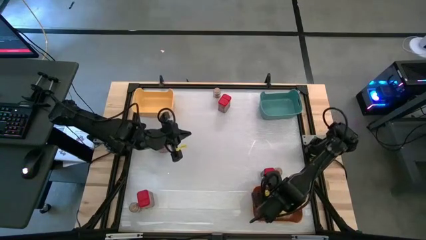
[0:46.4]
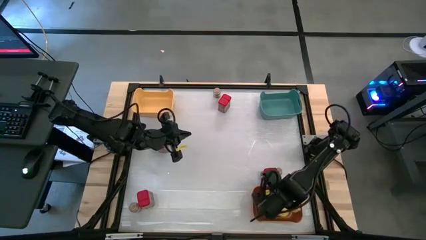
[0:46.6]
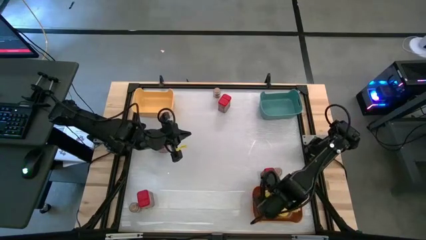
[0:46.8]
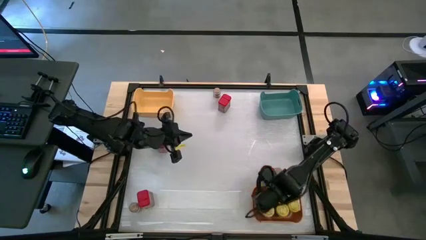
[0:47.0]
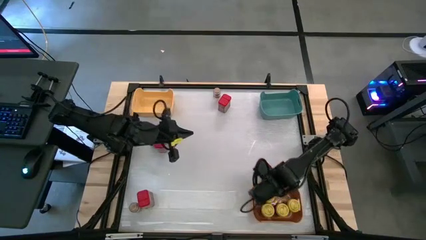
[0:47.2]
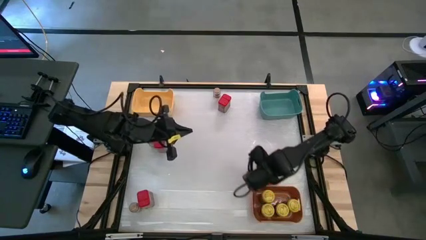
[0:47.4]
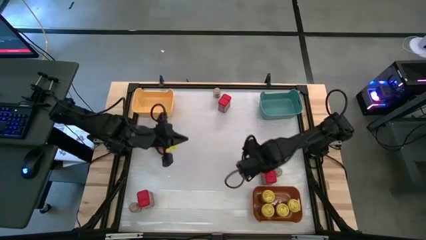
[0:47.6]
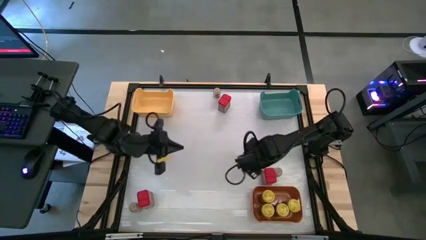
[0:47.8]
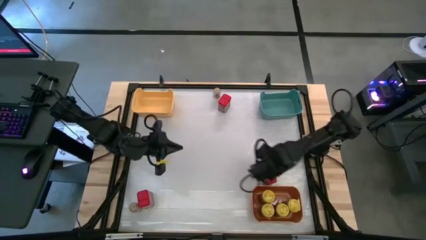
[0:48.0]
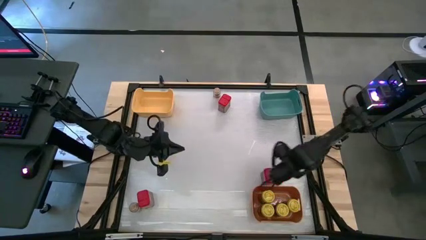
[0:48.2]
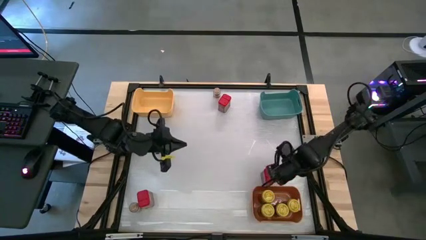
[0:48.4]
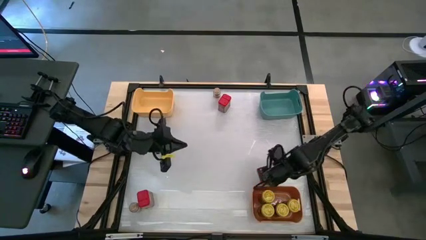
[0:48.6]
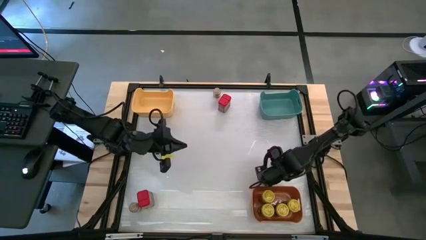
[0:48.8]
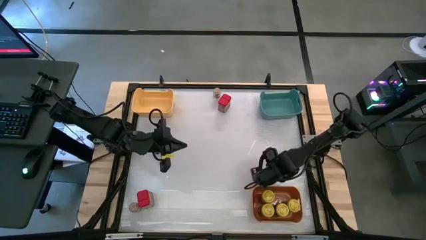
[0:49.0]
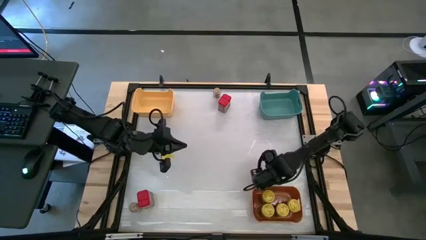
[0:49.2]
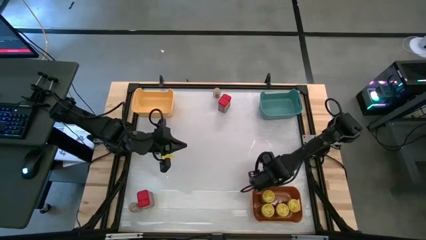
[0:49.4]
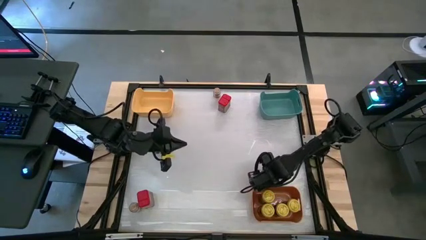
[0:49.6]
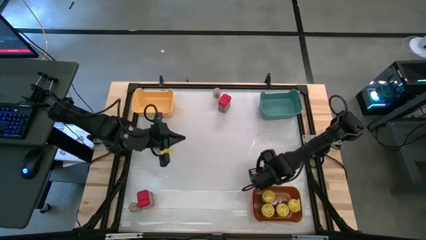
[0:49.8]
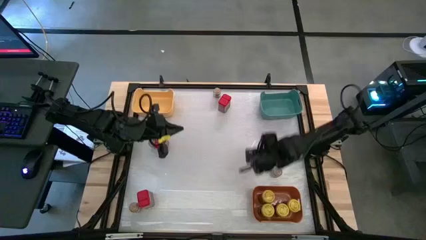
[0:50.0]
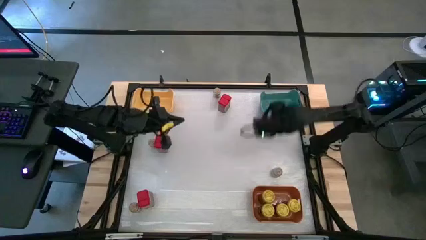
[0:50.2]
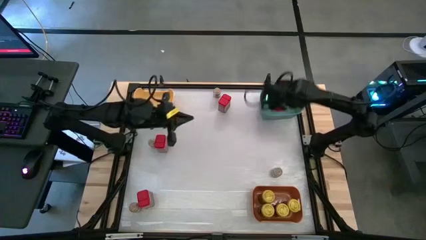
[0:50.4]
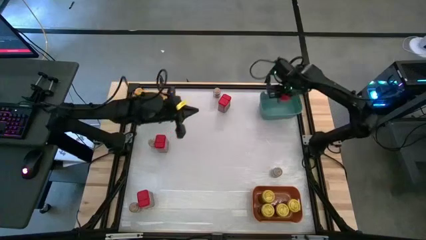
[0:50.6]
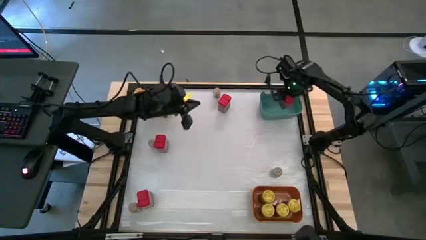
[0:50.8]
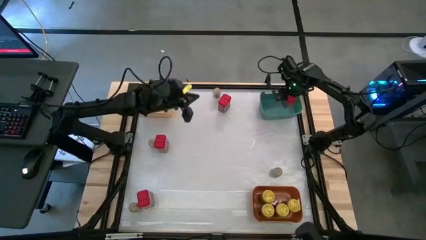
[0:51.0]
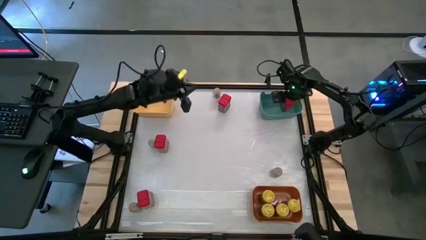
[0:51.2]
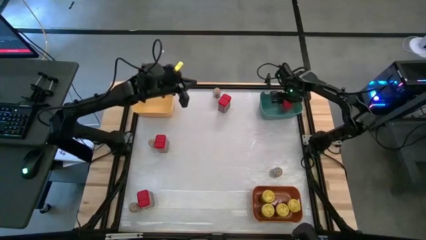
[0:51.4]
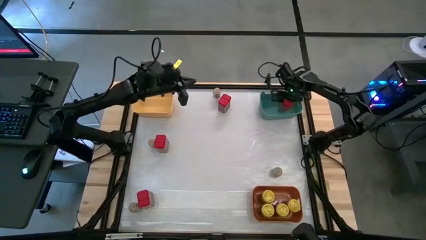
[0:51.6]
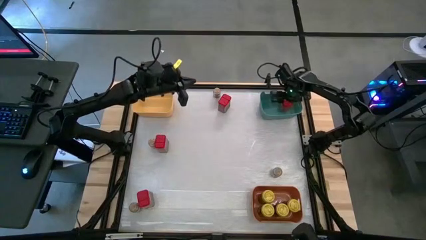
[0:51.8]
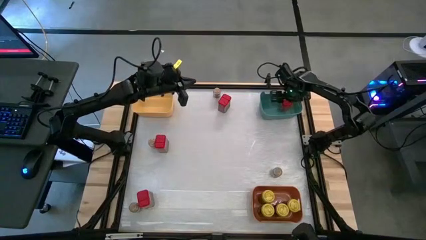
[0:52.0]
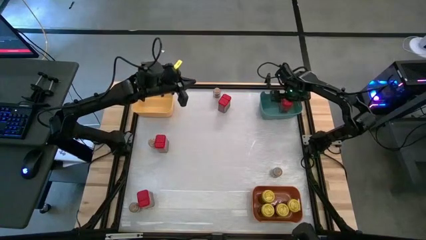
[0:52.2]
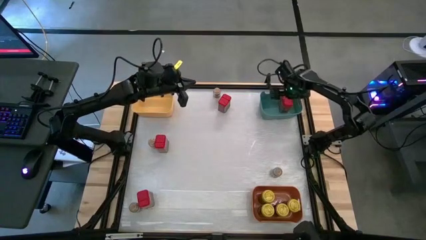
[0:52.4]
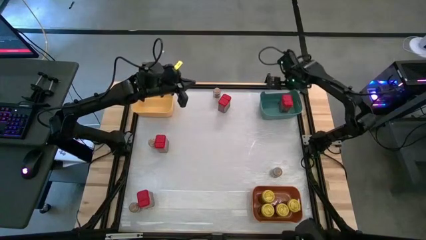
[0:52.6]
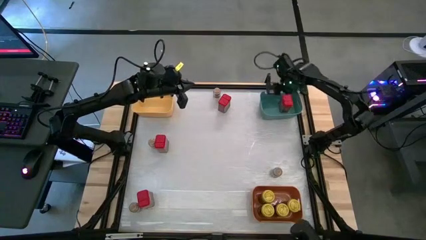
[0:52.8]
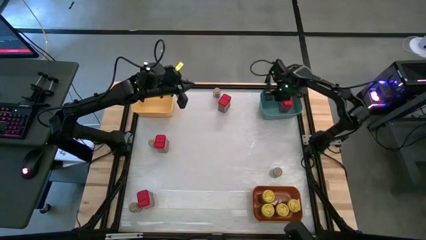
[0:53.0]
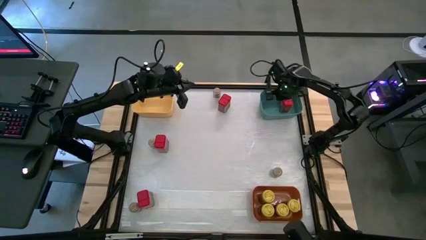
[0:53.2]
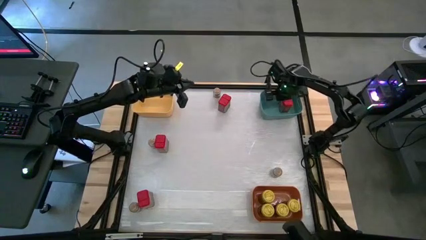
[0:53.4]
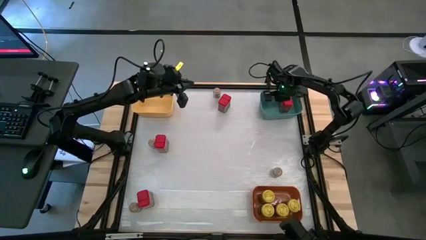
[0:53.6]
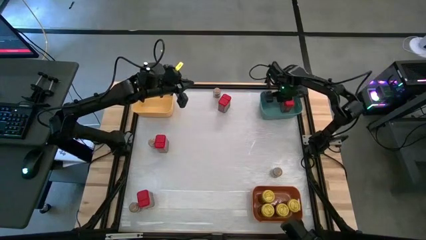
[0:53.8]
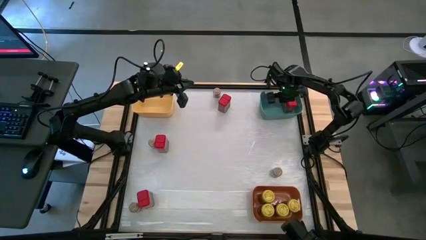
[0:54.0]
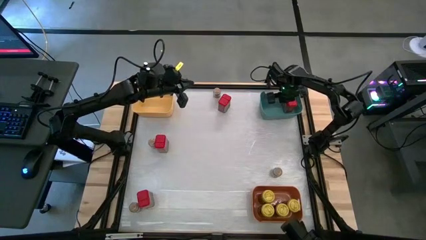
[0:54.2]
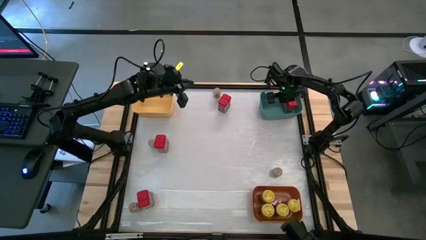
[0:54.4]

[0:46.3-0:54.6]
Task: Sort spices by type
Put the middle right red seasoning can into the green bin

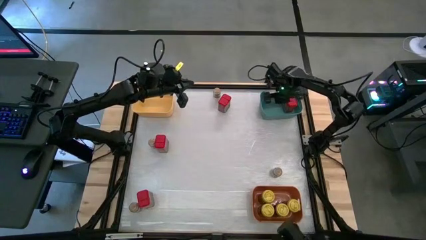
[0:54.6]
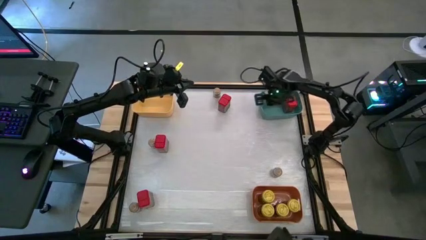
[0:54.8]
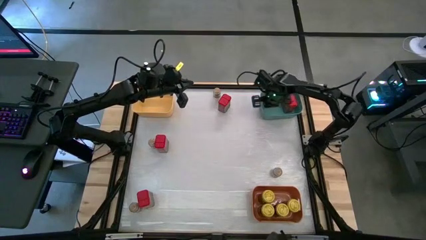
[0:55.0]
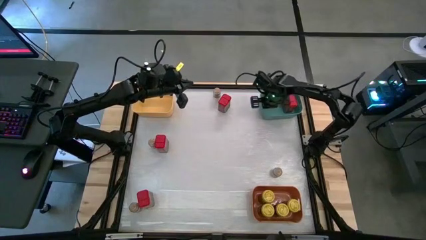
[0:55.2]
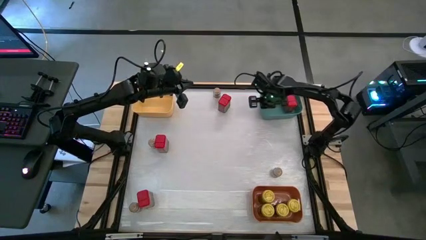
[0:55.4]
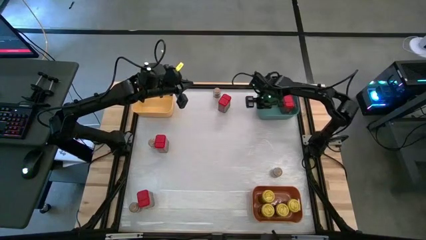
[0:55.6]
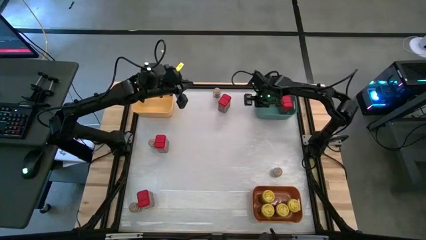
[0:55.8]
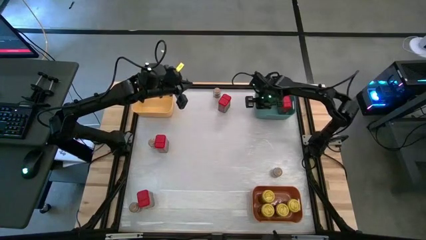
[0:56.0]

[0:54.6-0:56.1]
Adjust the green bin

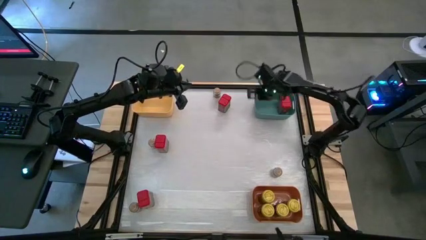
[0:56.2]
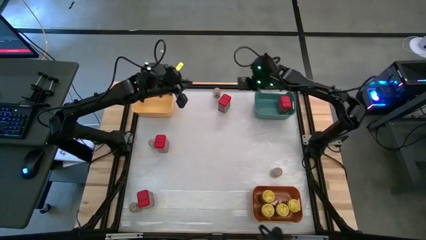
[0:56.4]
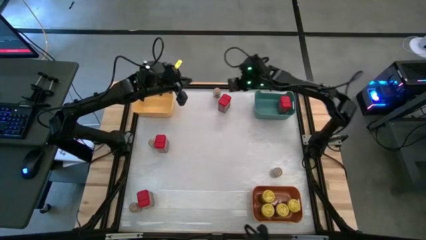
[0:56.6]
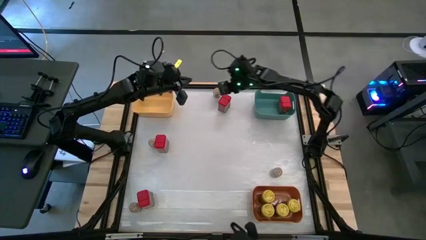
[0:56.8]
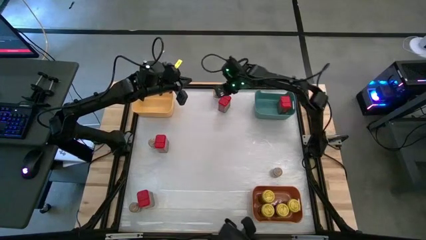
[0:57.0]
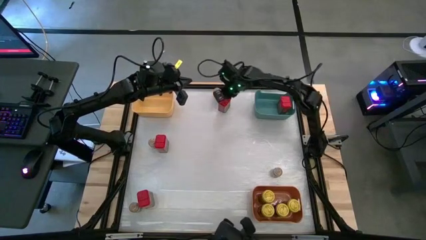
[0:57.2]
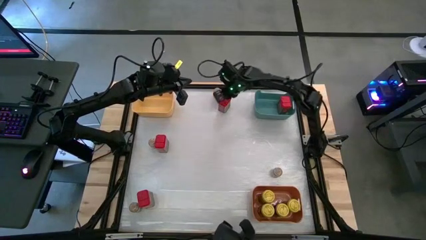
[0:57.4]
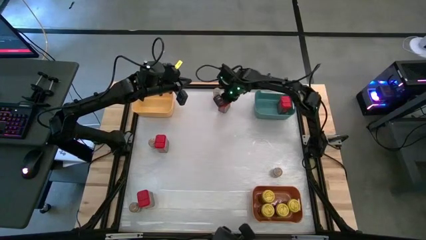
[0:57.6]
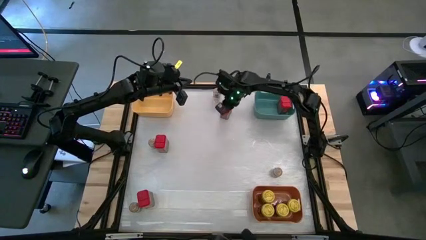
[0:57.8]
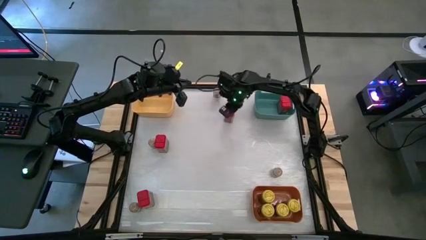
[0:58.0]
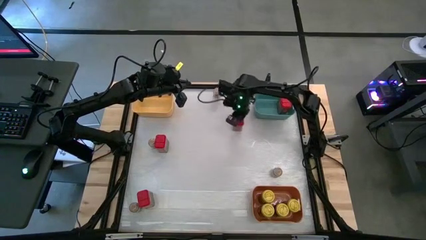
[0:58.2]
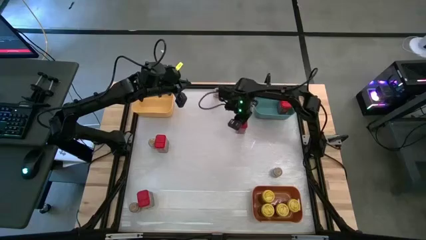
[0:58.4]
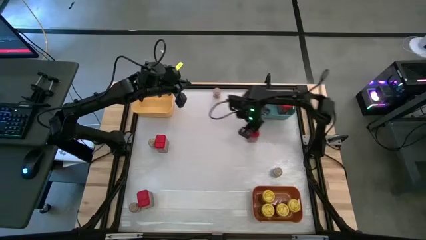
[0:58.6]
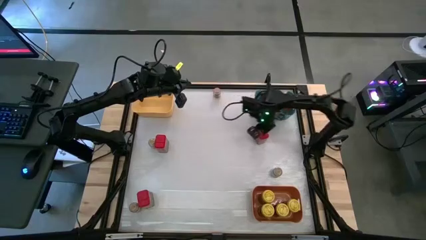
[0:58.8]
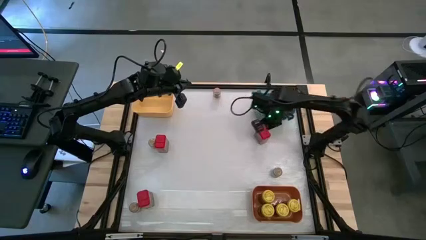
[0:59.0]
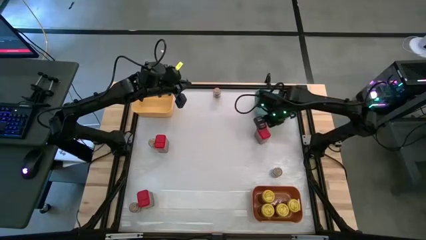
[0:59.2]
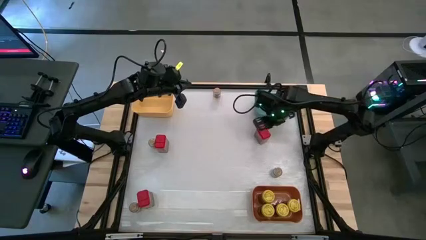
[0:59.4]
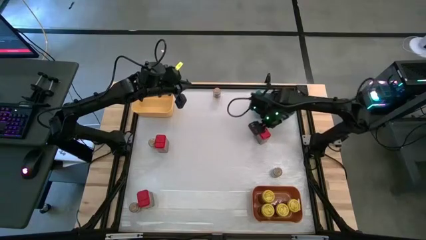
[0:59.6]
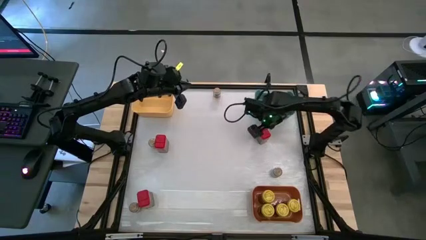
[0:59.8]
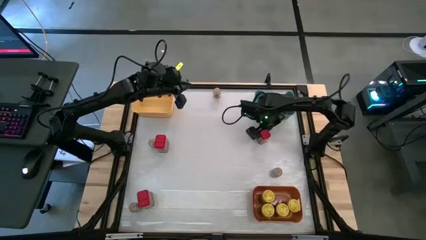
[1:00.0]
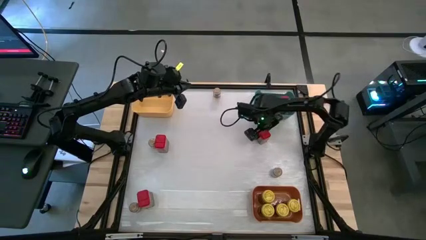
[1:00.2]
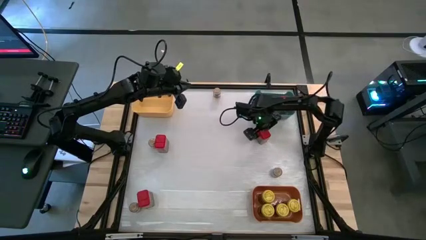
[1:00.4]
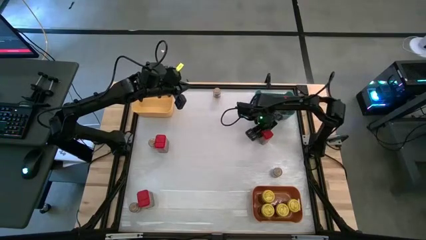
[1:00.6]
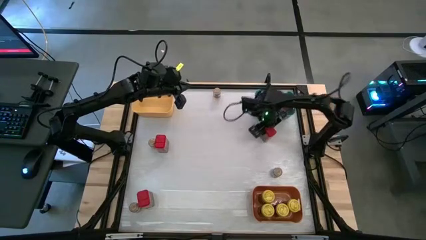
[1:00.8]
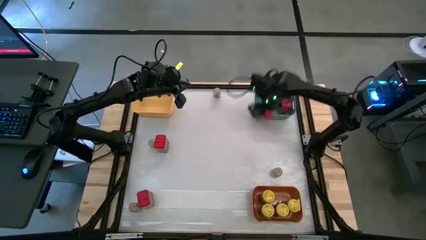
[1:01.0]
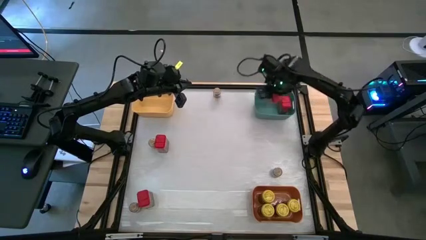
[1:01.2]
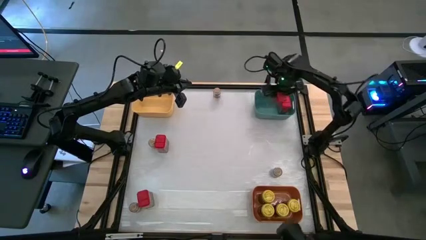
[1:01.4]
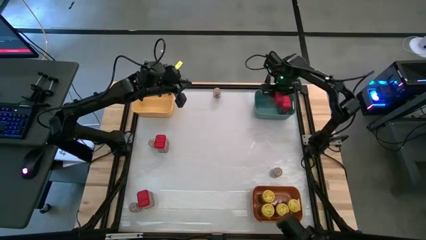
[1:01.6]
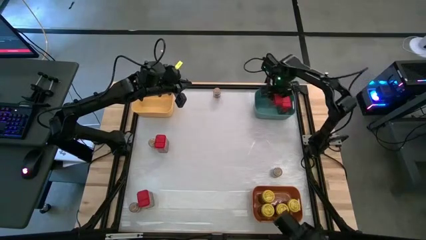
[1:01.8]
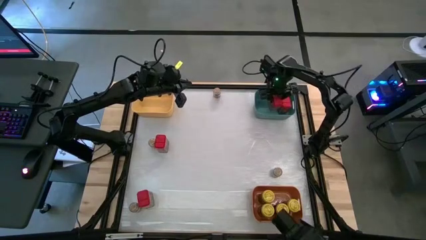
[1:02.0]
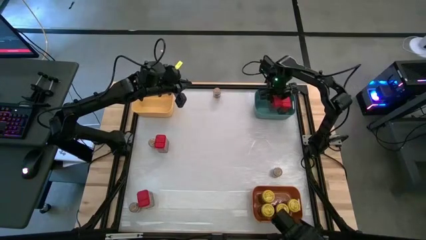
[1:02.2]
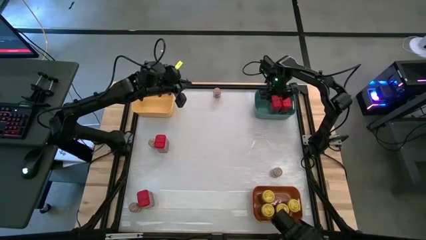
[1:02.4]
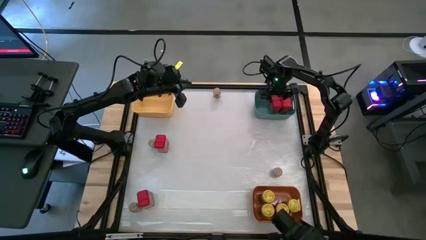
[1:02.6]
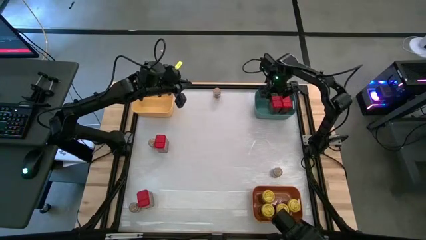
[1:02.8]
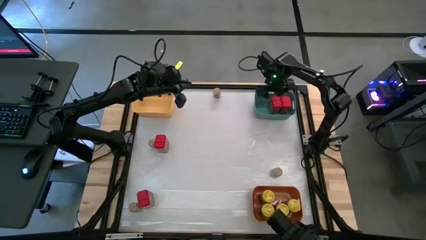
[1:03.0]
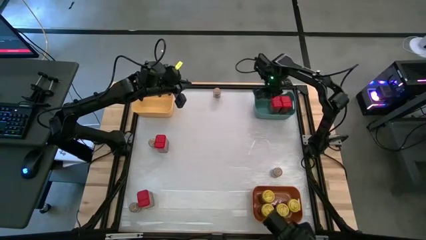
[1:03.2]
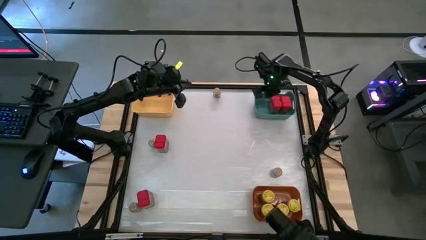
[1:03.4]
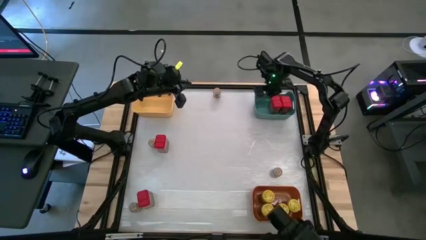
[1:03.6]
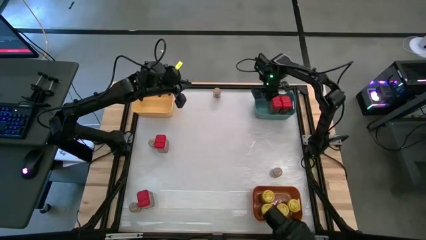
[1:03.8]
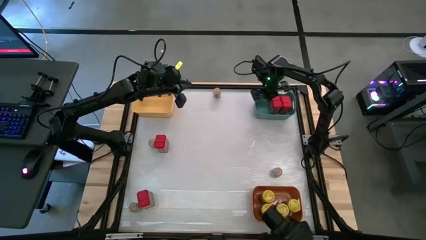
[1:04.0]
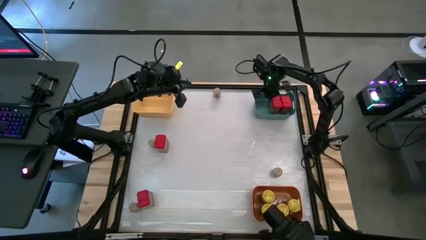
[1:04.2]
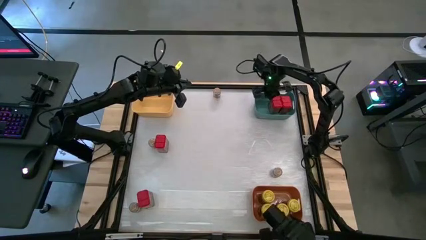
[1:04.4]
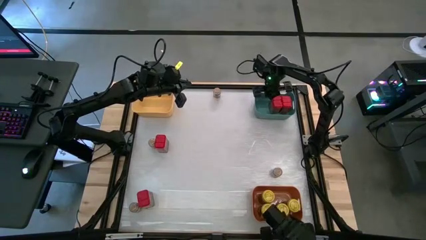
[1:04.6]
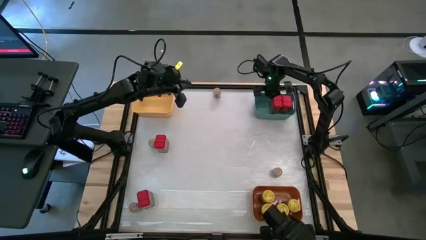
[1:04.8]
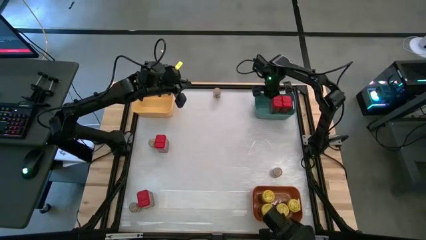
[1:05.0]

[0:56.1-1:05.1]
Put the top red seasoning can into the green bin
